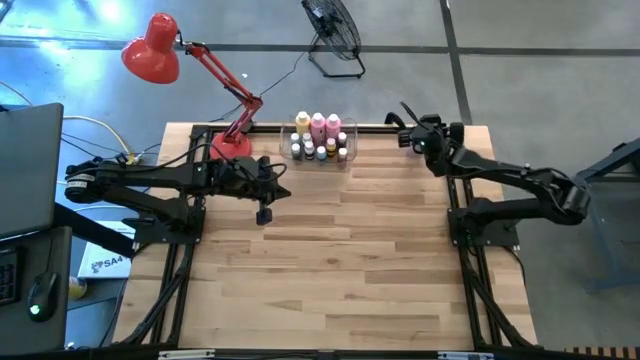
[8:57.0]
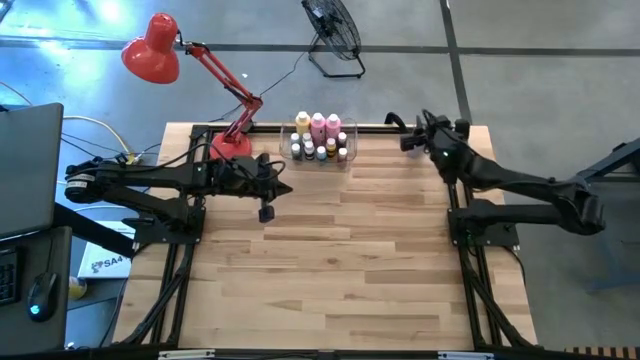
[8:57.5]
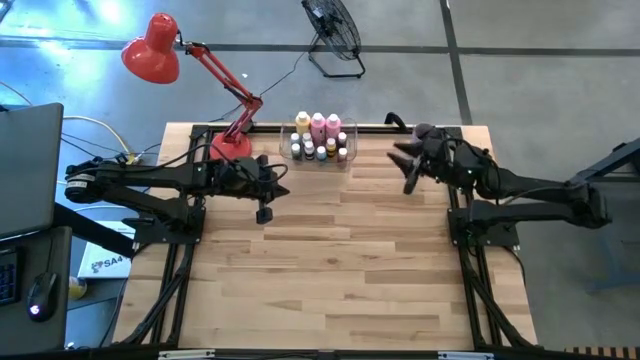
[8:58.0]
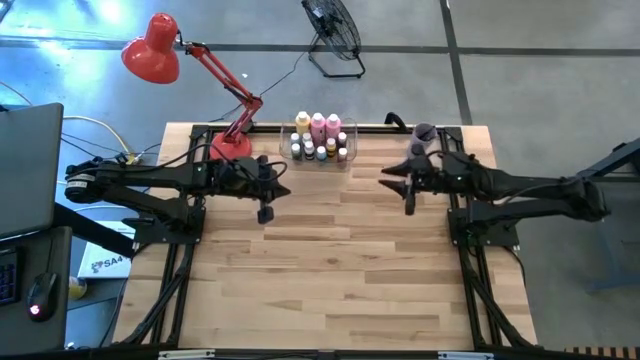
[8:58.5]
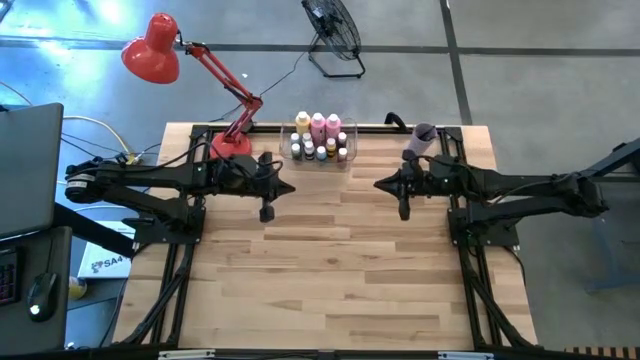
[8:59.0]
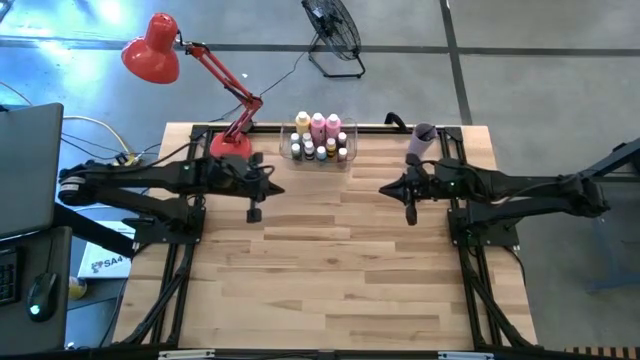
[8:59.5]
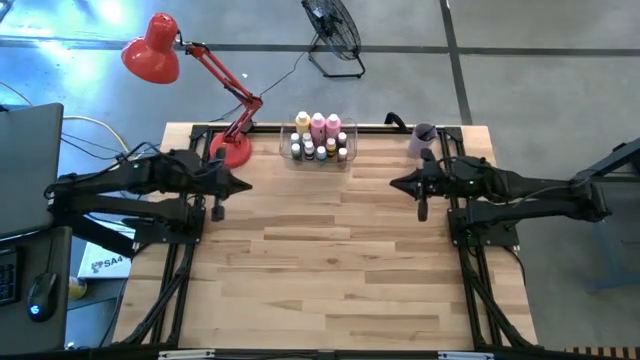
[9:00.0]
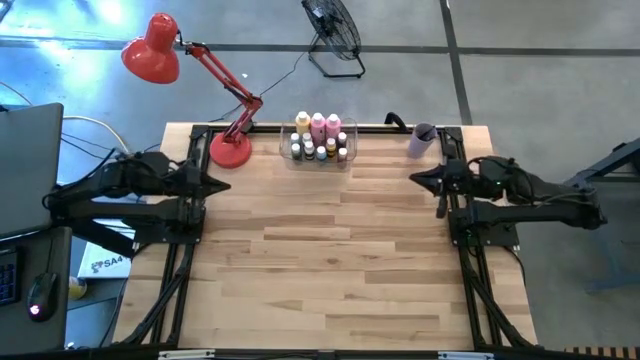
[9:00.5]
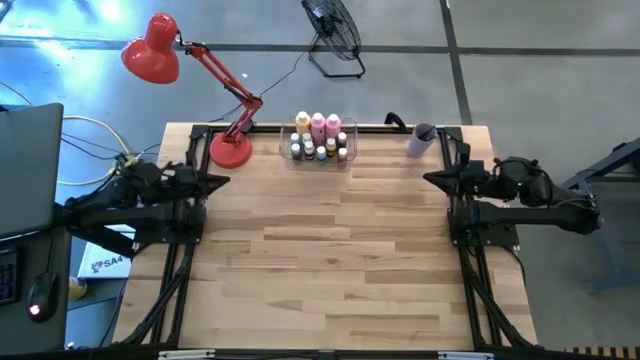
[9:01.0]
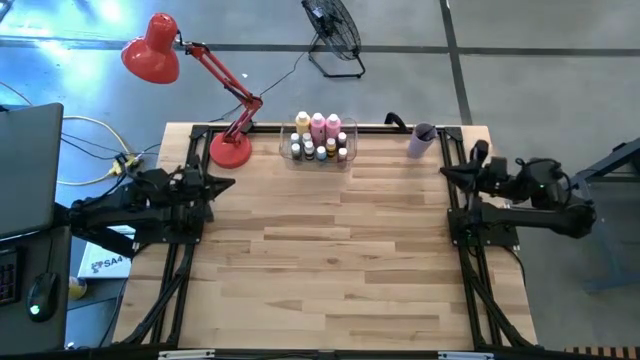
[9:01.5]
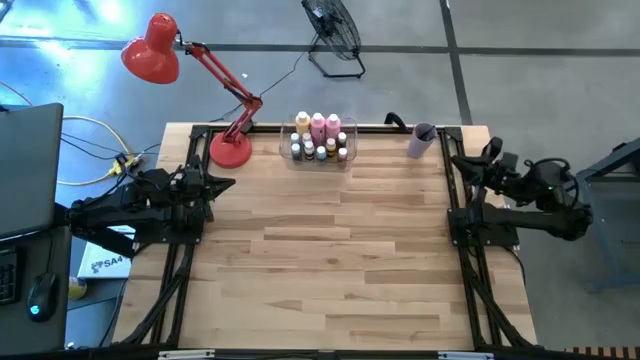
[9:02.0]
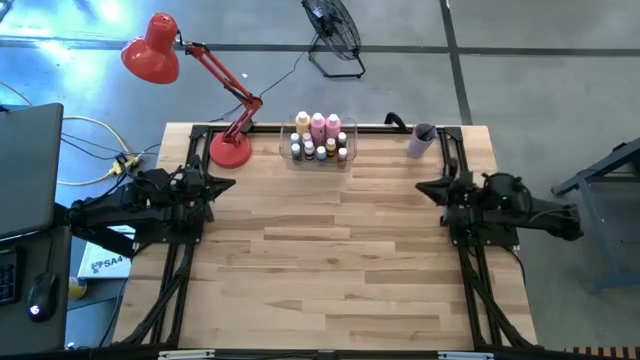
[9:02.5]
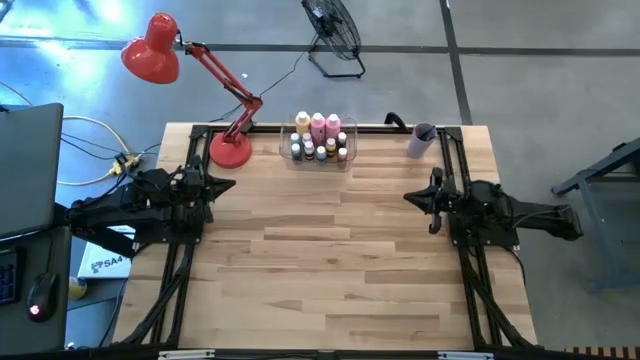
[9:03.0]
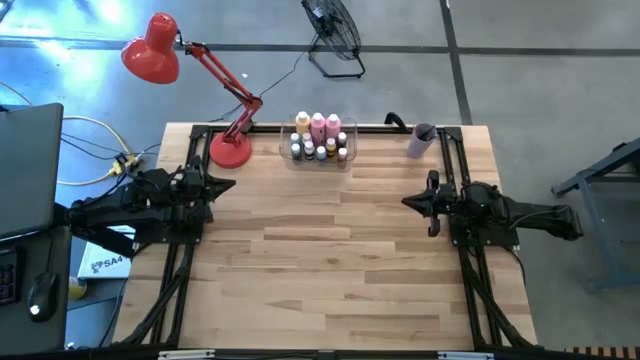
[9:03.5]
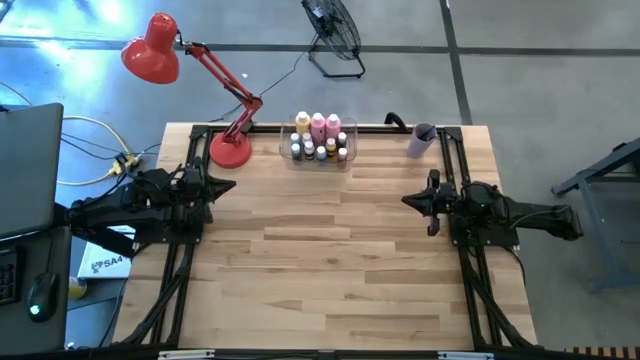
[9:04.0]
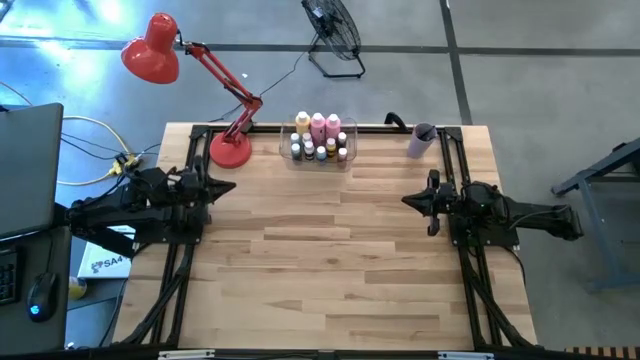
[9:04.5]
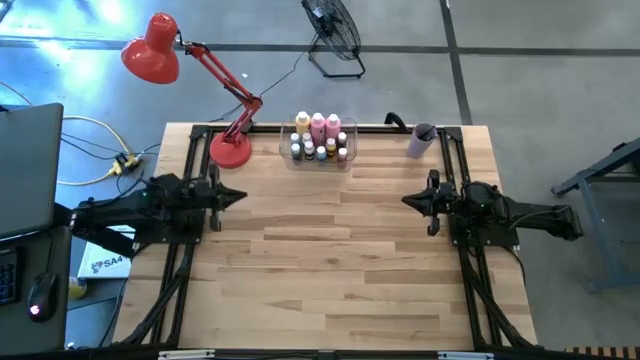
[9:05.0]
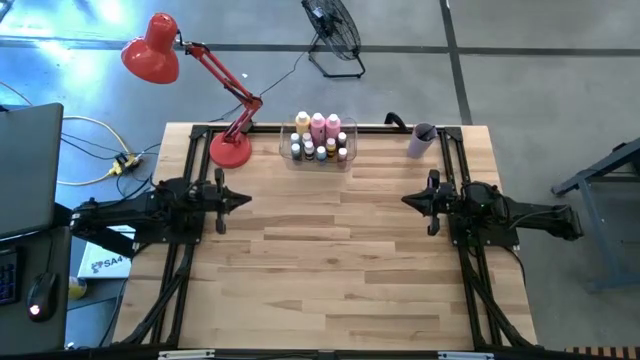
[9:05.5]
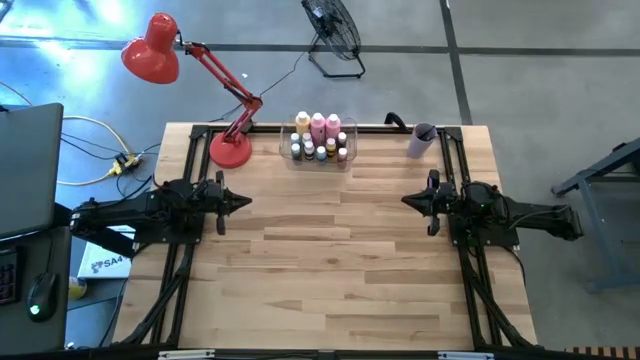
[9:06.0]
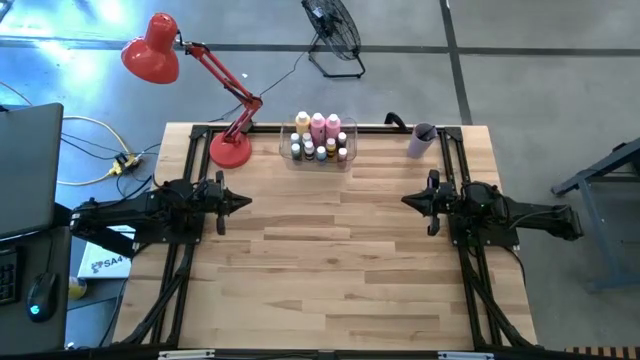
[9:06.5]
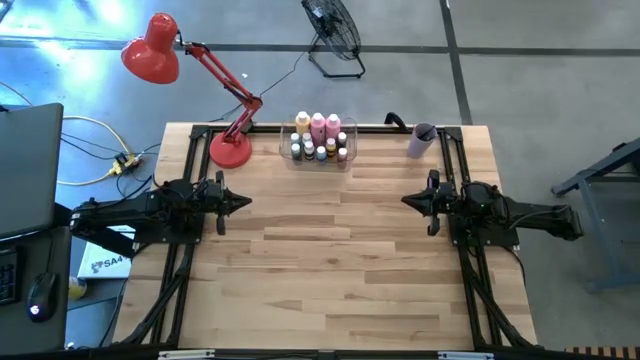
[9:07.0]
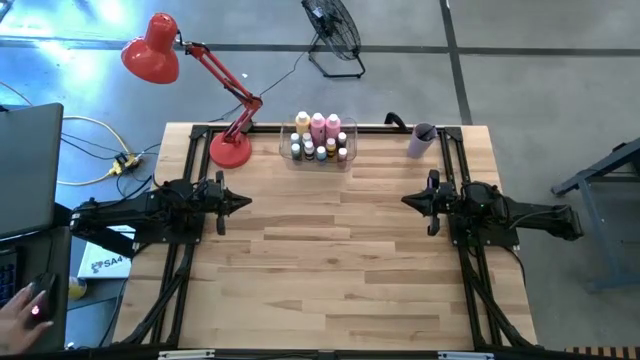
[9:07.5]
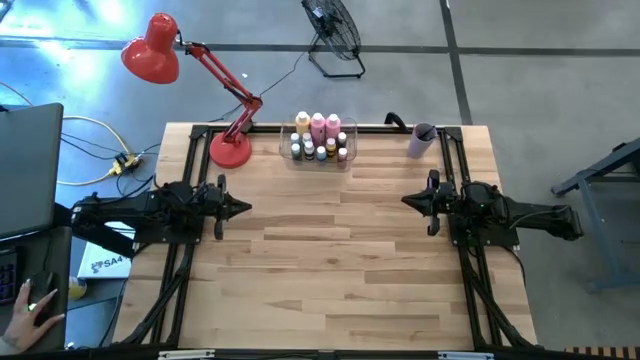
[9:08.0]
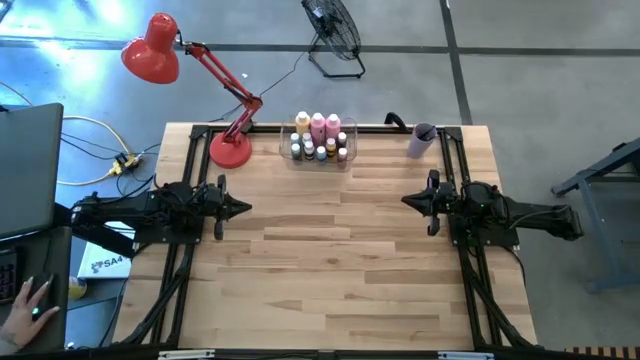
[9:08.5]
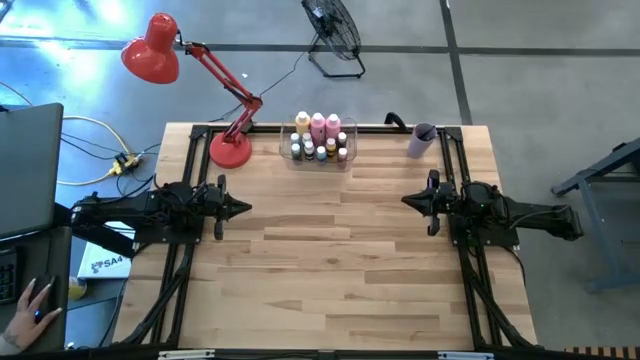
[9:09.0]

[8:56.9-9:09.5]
Task: Pick & Place Paint Supplies
Return to Home Position

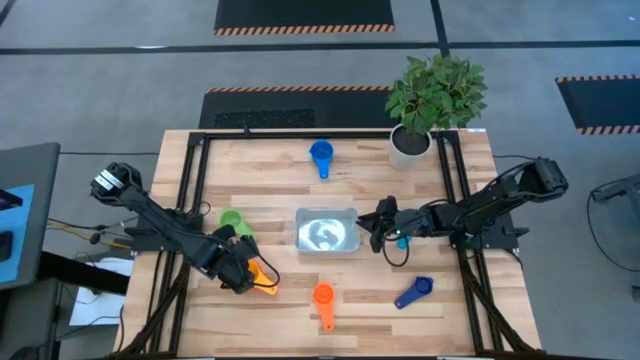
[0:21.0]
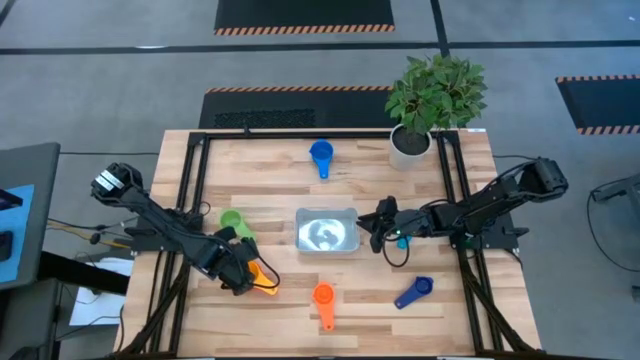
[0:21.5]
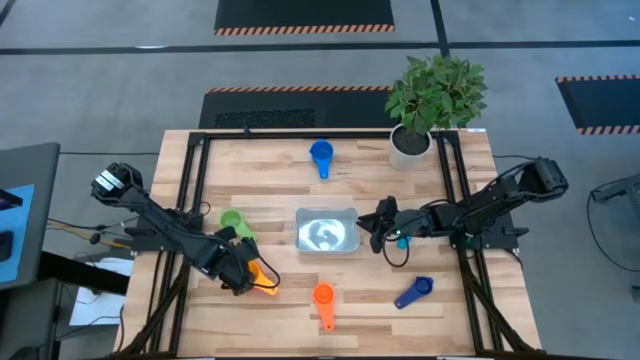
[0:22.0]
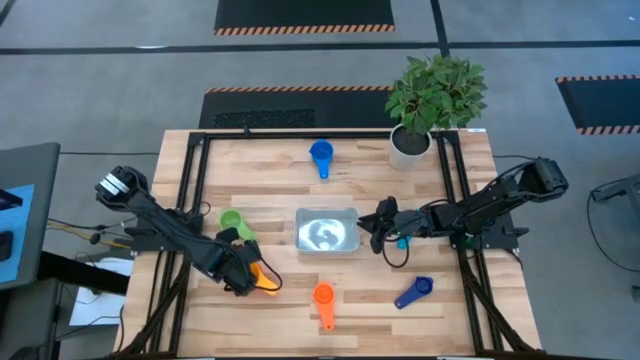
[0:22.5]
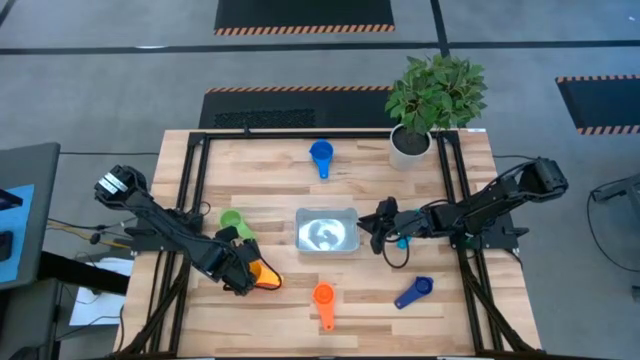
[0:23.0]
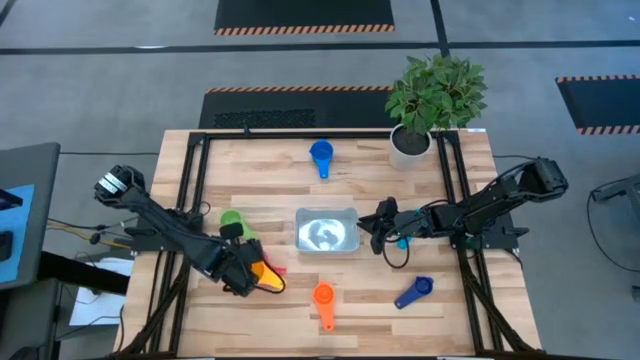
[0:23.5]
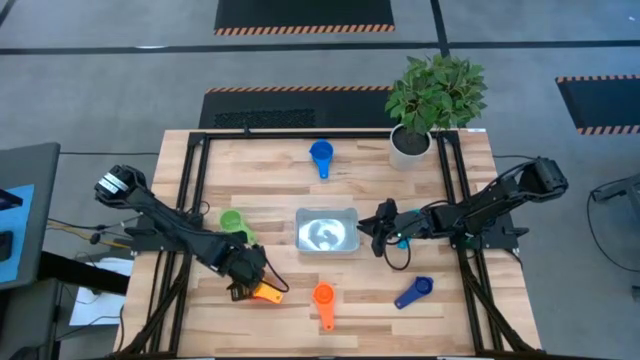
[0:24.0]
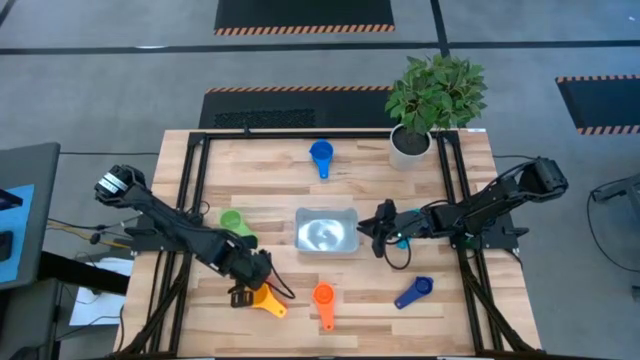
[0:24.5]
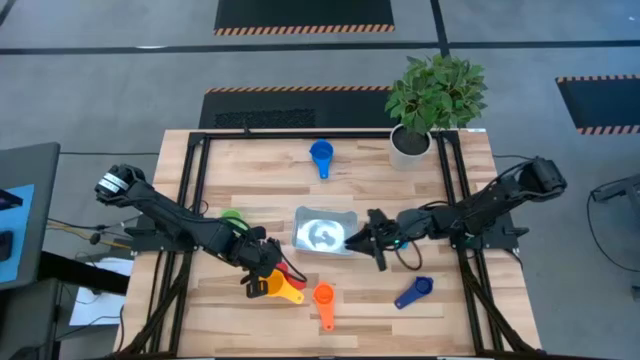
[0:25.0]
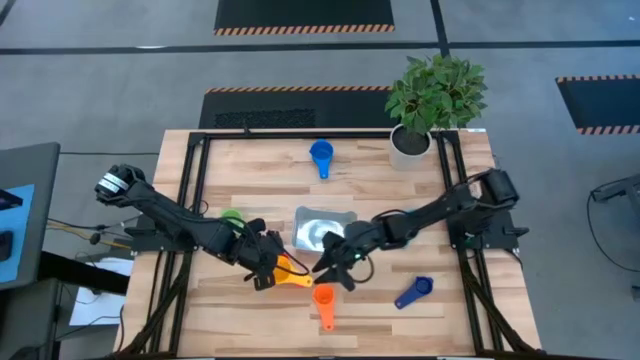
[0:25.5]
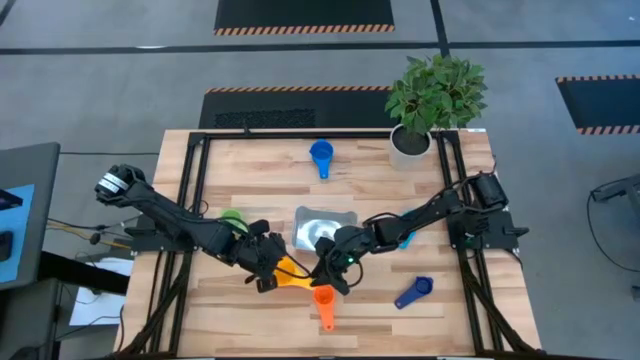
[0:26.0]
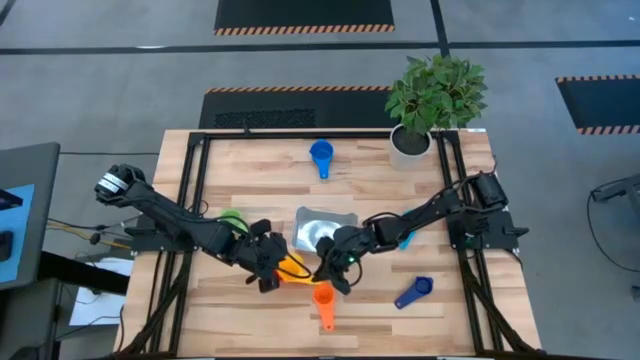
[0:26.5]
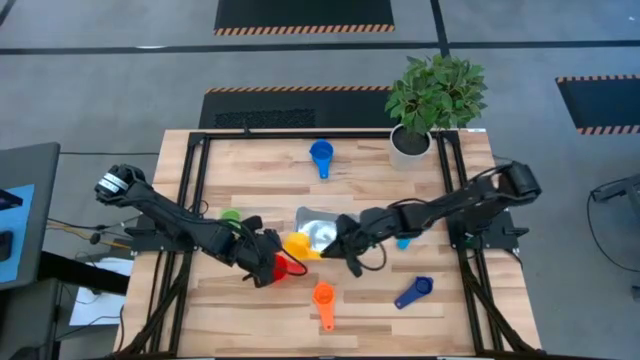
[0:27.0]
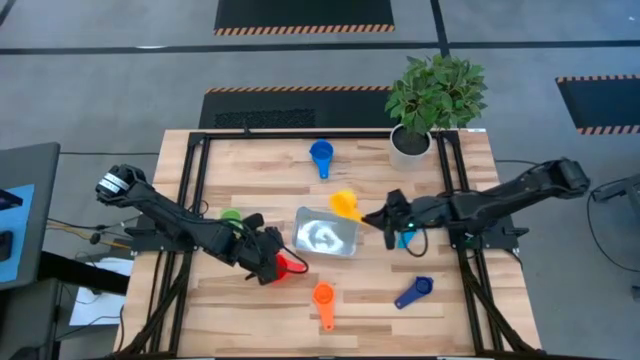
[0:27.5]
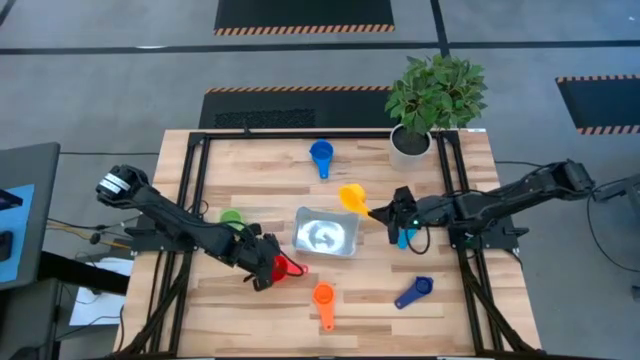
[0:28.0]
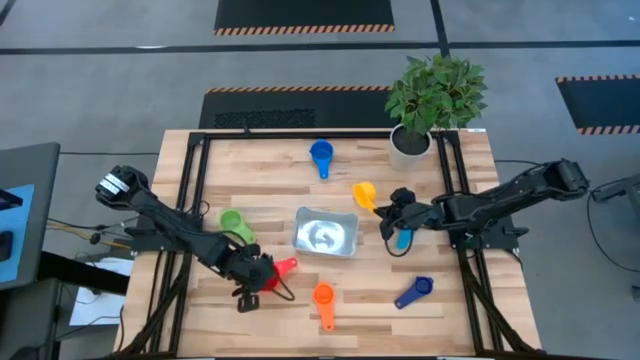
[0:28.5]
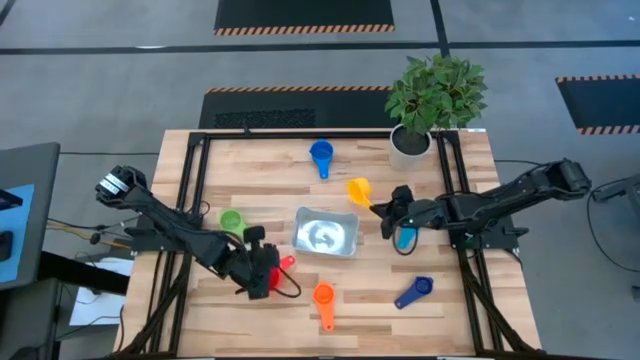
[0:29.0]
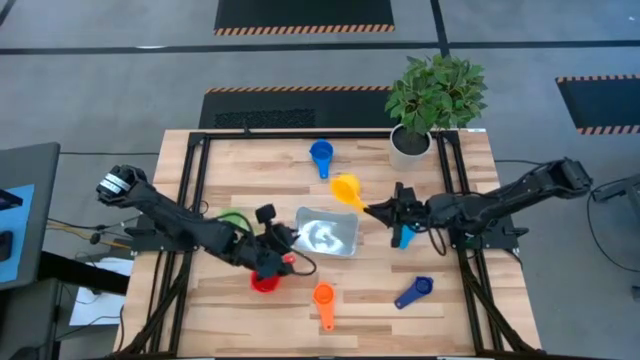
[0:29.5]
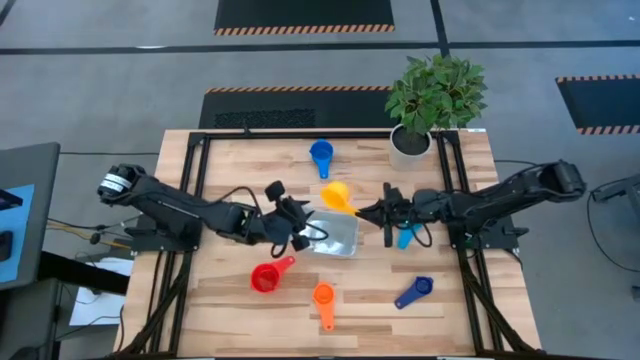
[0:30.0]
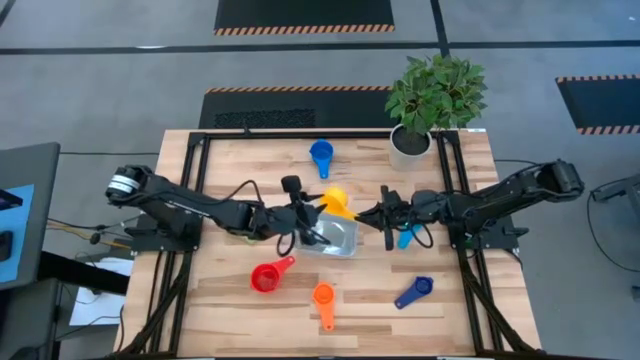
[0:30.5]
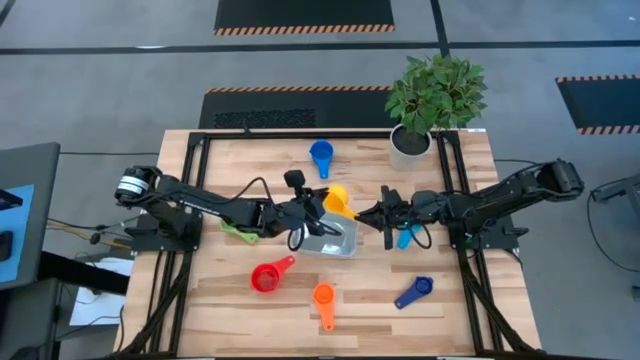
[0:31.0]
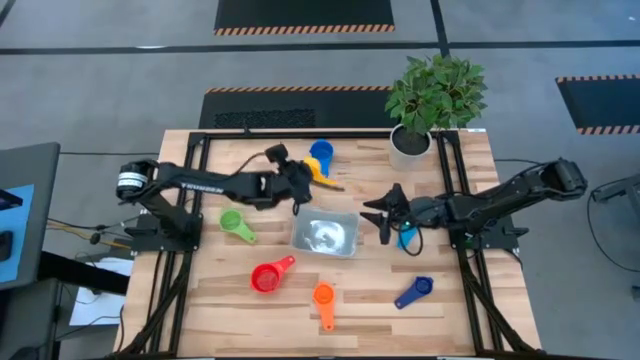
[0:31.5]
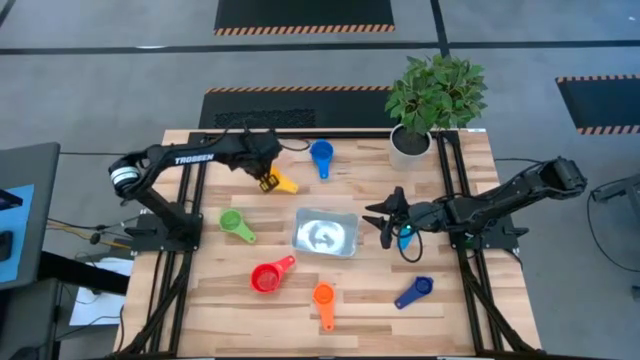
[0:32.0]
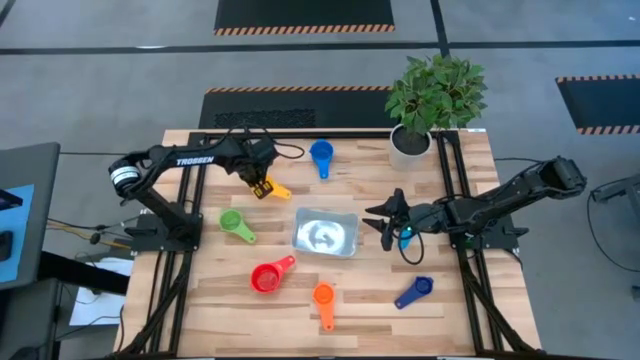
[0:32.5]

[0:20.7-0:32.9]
Task: Nest measuring cups in basket
Remove the yellow measuring cup from the red measuring cup
